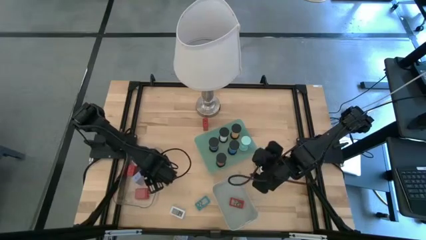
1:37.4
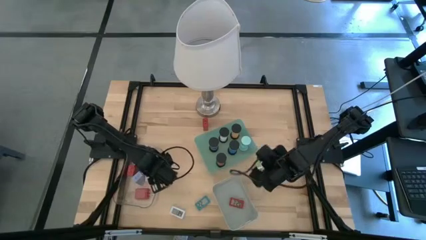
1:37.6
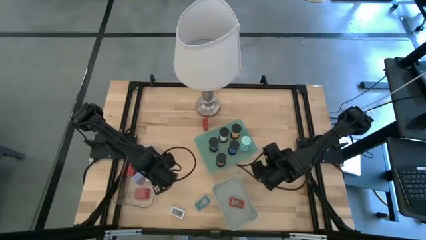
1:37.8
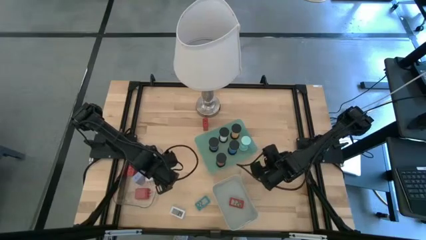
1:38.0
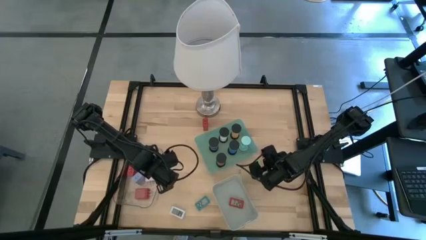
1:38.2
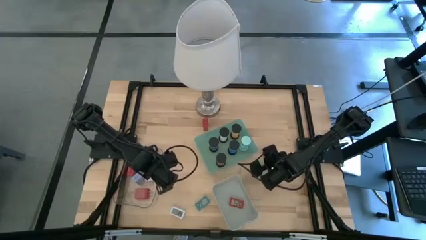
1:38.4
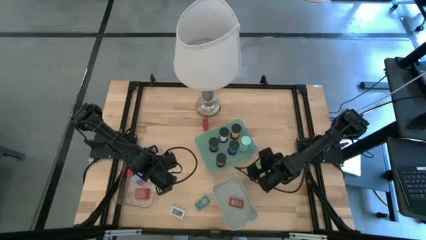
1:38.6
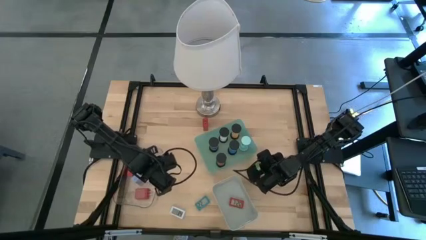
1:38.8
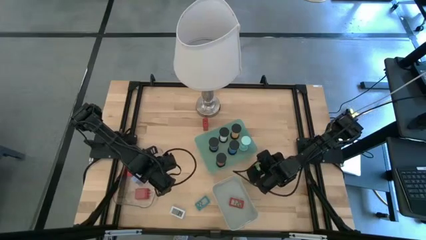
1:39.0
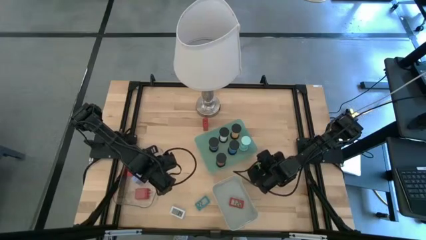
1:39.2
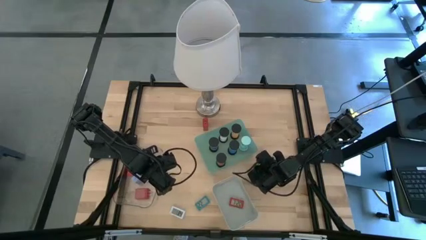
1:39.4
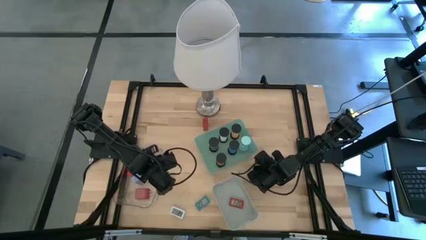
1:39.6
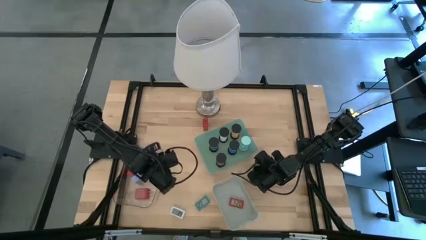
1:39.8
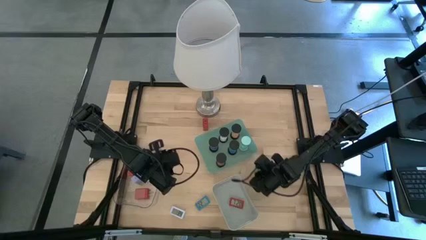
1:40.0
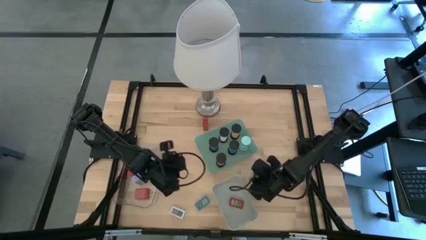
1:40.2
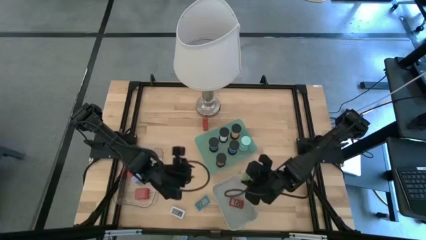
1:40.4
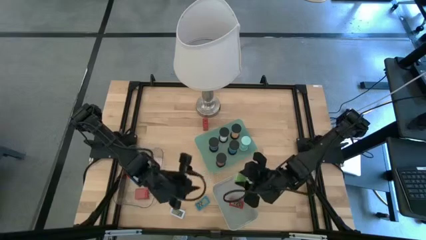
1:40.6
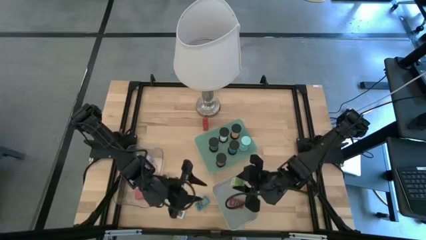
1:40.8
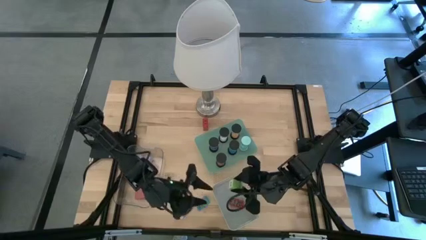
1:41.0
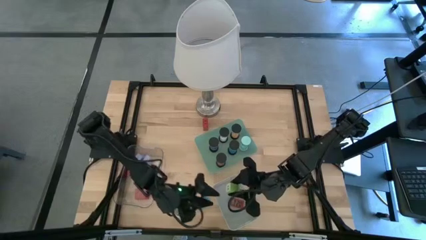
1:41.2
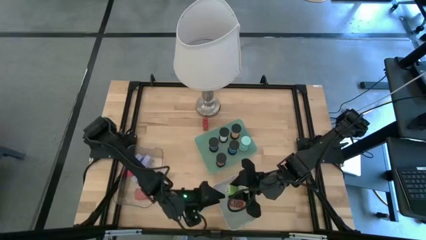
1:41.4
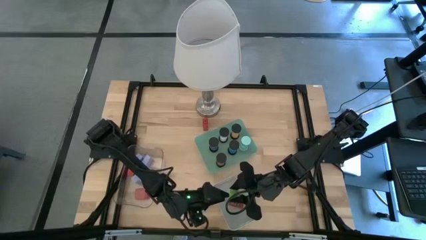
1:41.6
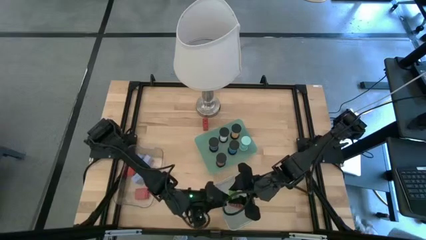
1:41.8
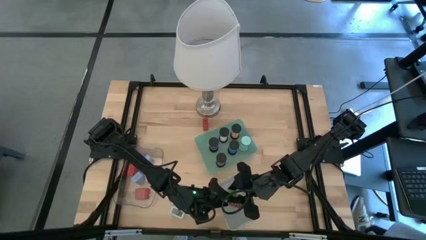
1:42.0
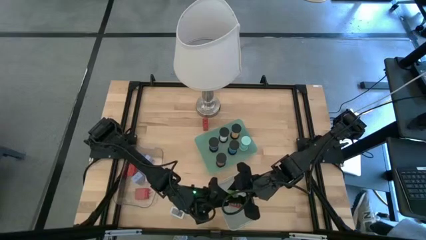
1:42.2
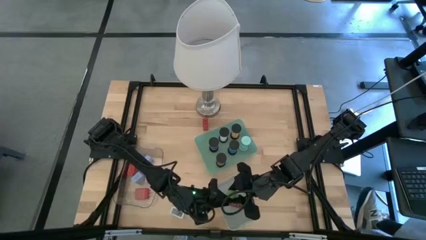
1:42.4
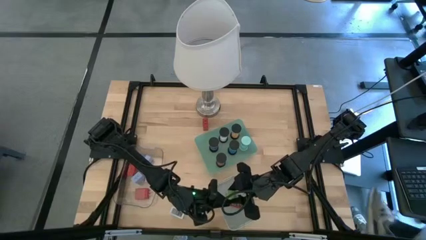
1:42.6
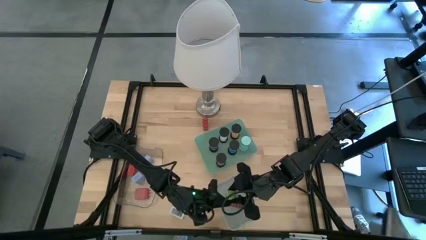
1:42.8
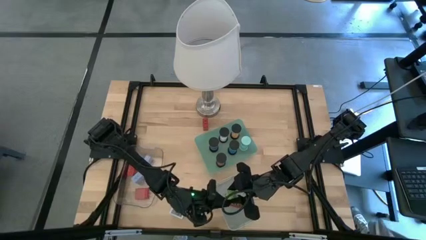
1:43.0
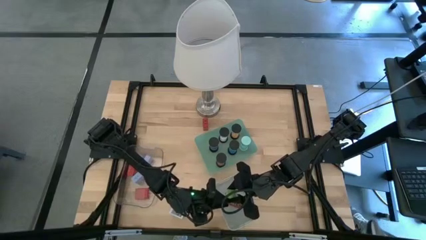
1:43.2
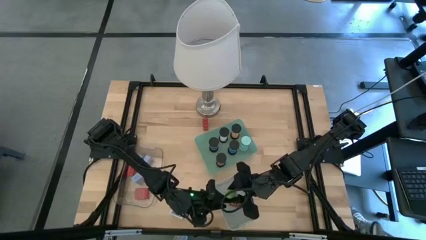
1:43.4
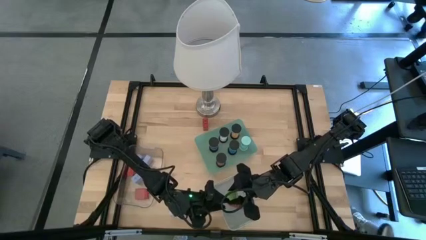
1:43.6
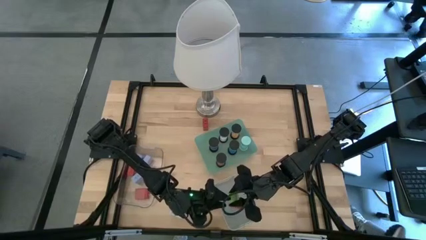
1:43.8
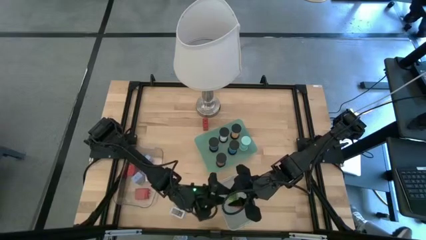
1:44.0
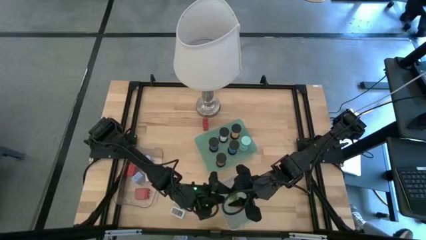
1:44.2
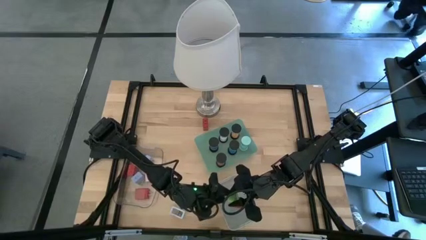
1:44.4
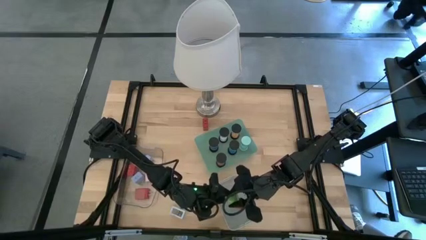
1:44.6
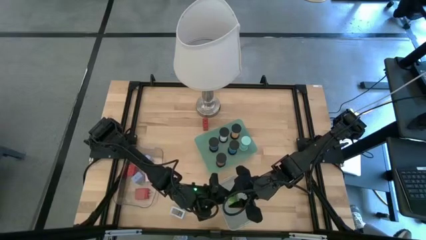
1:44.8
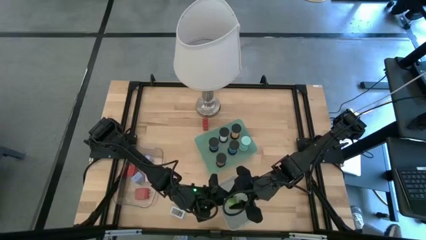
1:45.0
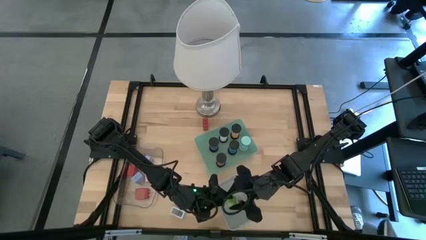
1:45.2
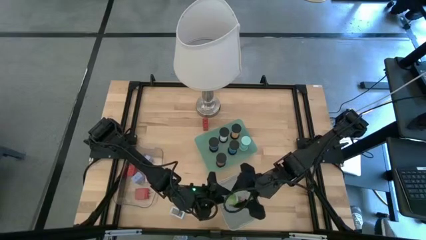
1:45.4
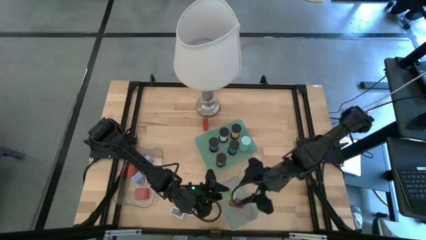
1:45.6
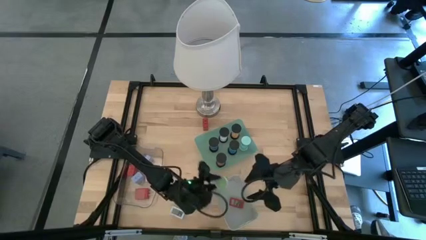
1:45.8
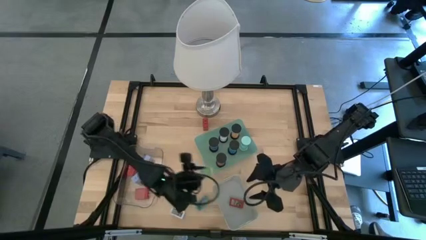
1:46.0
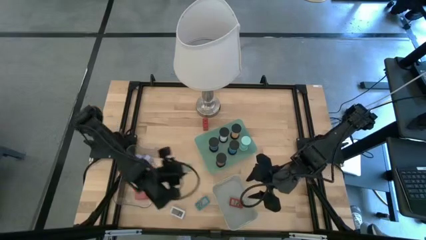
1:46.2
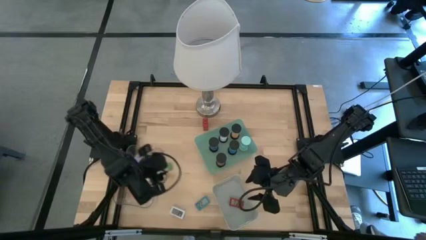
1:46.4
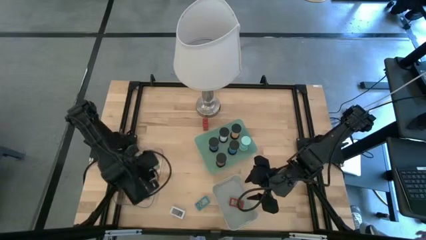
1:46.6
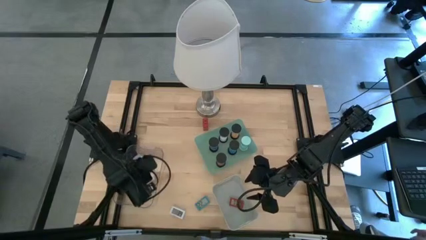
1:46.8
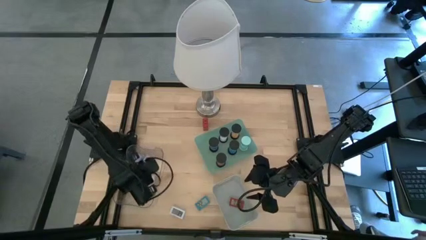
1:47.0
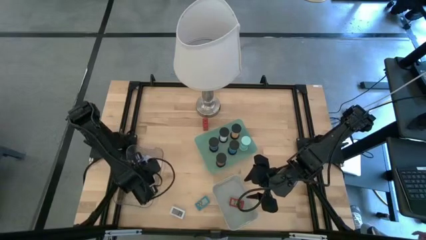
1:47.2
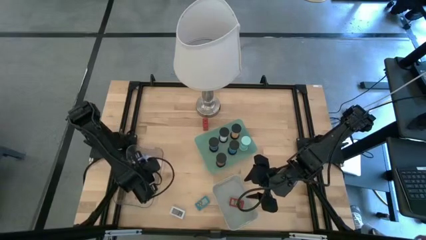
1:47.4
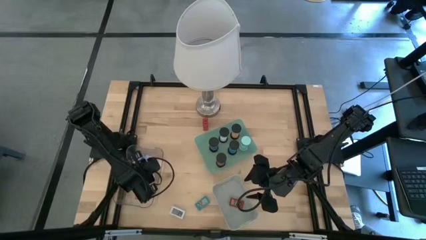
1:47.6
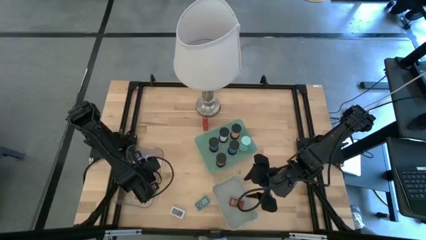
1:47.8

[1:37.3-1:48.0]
Task: Pick & Place Office items
Put the green charger adapter into the transparent bin

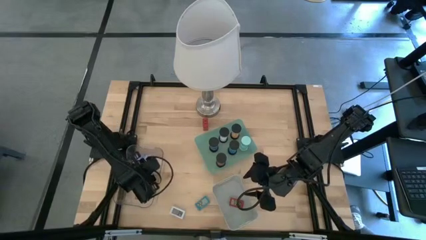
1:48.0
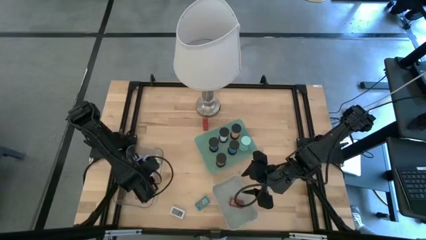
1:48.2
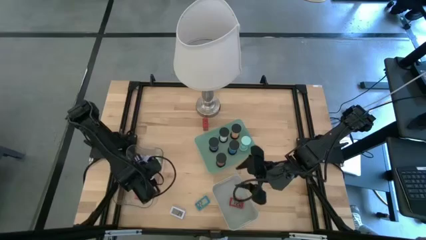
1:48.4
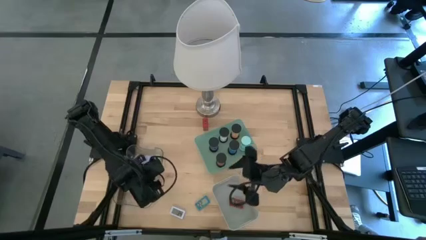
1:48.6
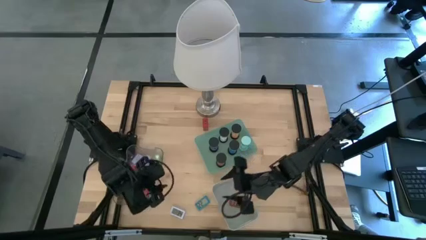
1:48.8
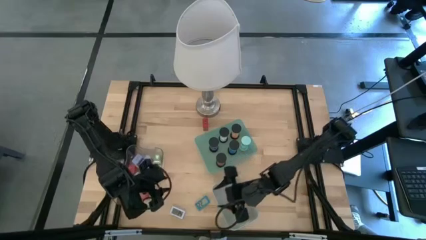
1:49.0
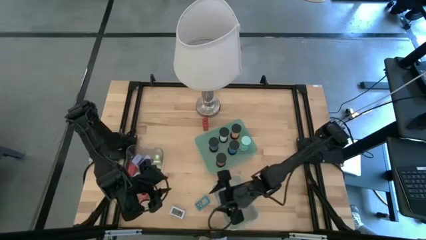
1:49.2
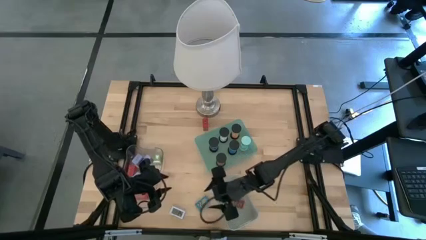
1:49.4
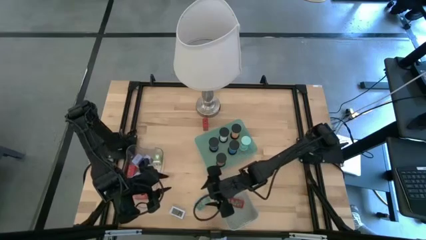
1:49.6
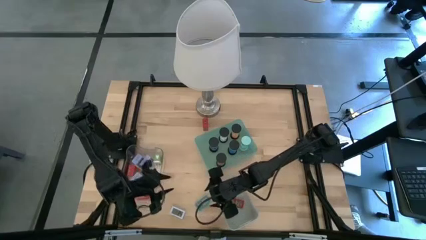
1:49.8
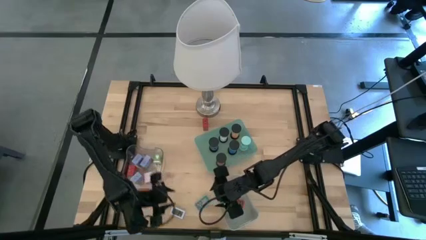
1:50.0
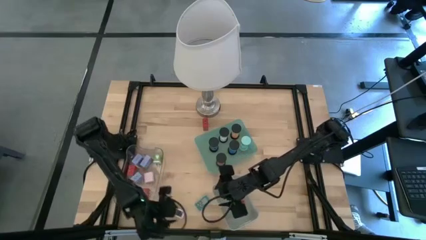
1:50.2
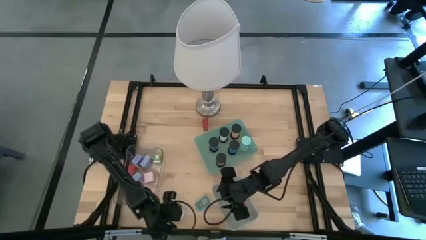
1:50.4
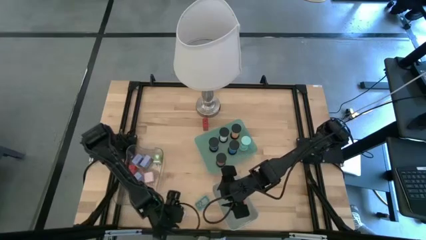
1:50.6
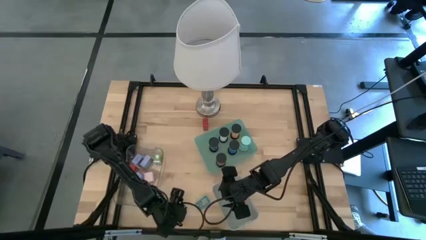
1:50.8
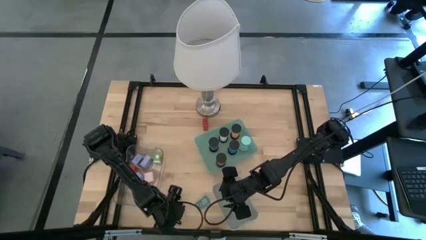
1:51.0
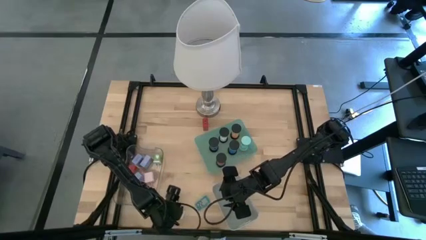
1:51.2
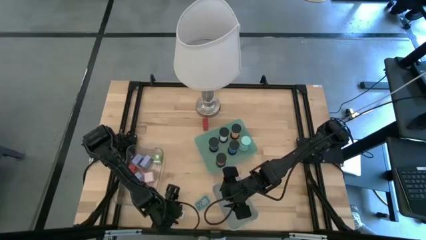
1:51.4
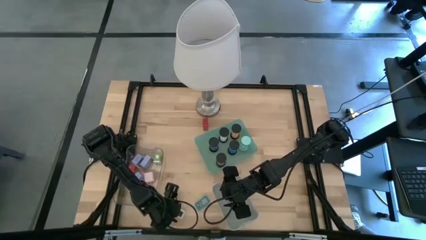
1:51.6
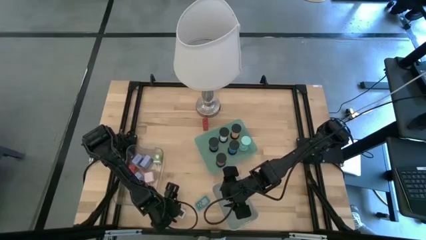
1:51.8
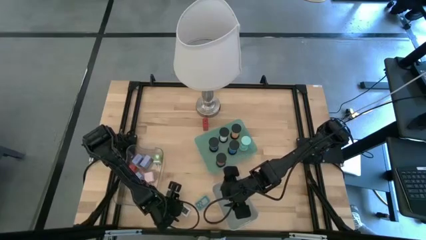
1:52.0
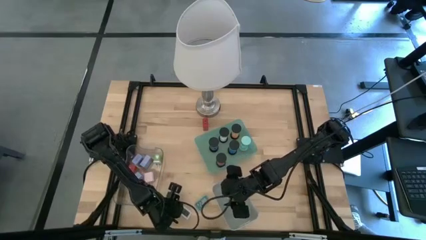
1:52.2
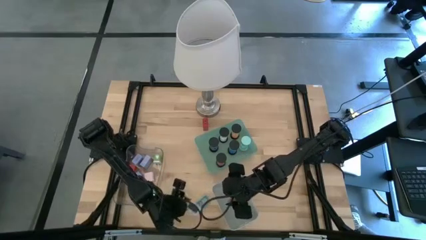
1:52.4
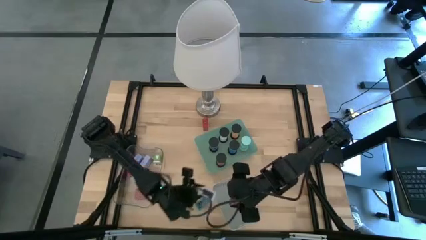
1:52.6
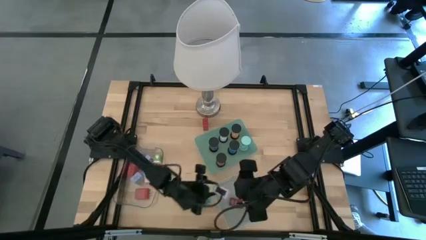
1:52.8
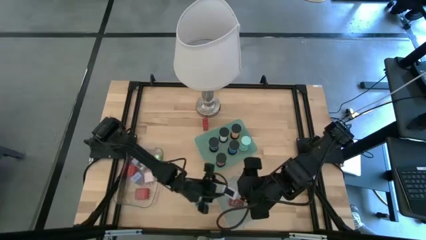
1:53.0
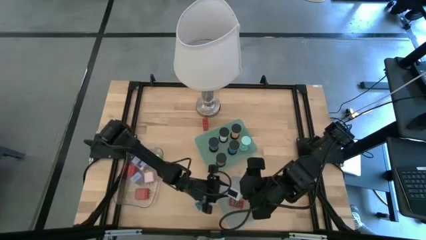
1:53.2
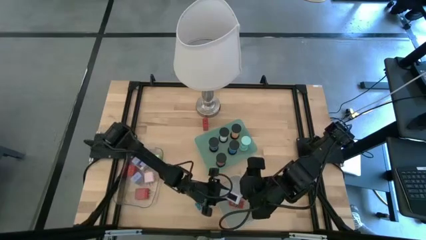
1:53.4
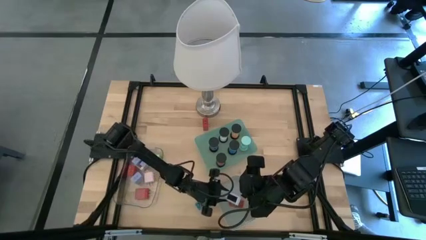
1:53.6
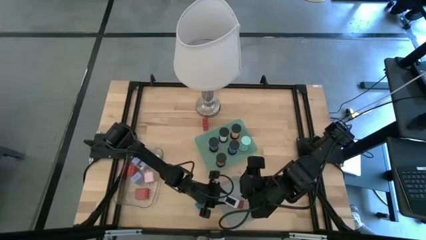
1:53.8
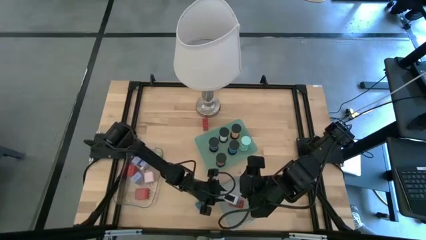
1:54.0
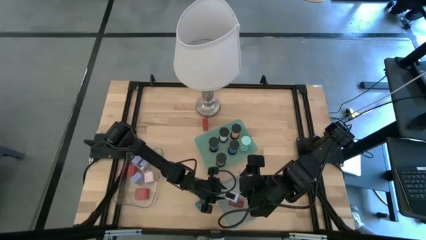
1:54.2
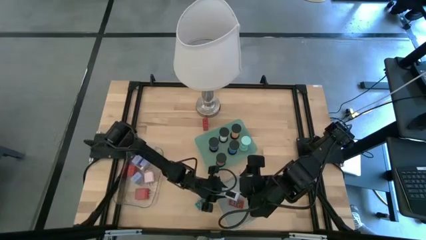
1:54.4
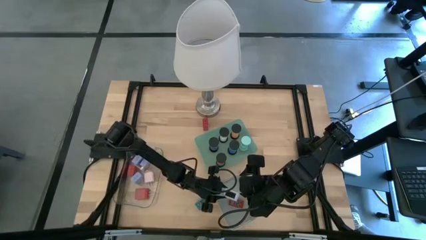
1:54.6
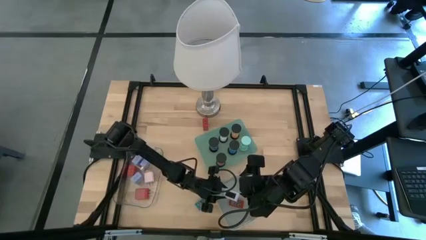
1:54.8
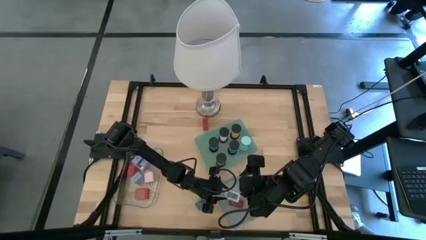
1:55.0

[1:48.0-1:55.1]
Put the white digital timer into the gray bin
